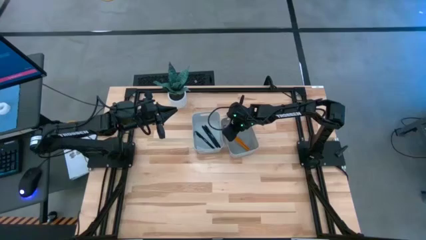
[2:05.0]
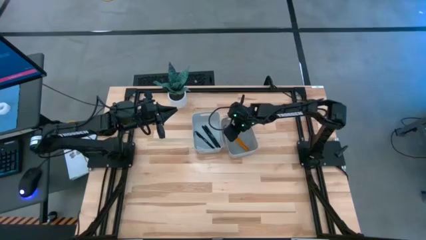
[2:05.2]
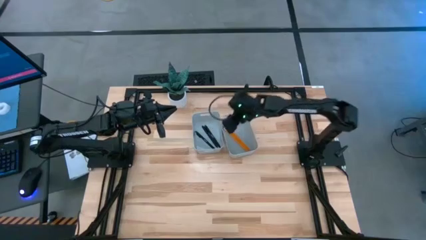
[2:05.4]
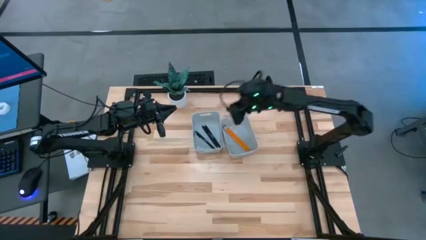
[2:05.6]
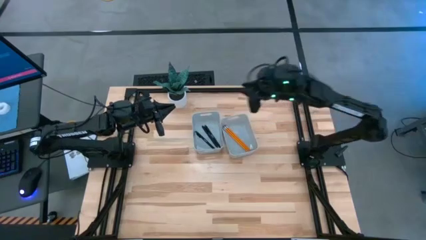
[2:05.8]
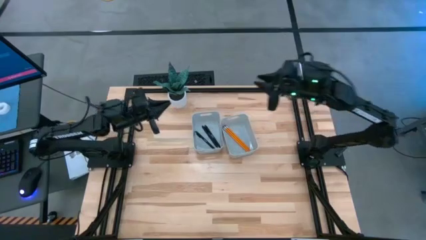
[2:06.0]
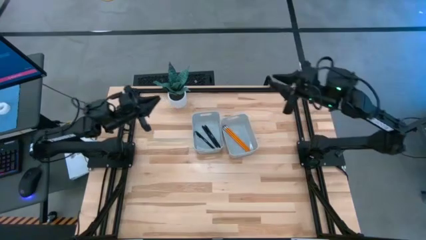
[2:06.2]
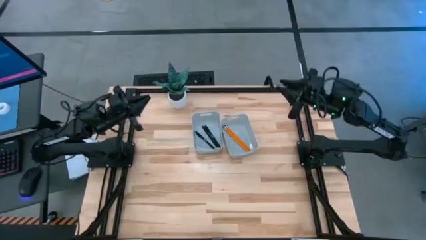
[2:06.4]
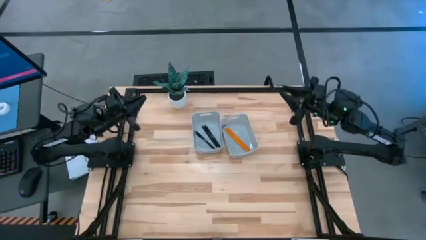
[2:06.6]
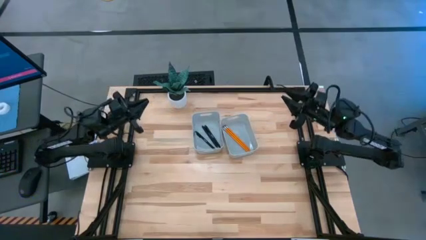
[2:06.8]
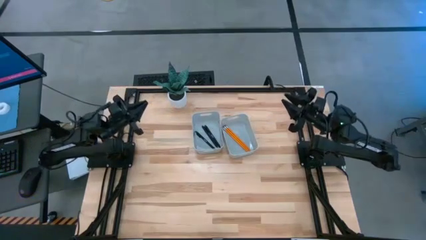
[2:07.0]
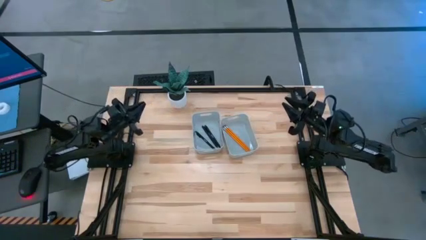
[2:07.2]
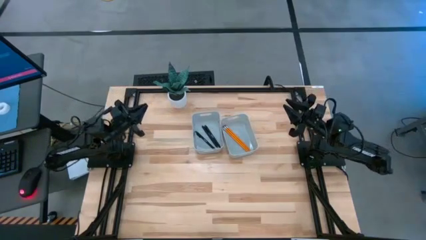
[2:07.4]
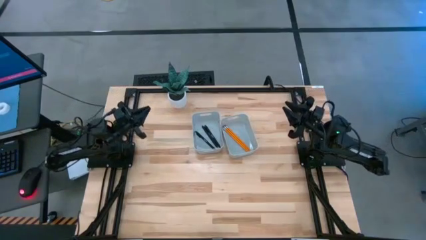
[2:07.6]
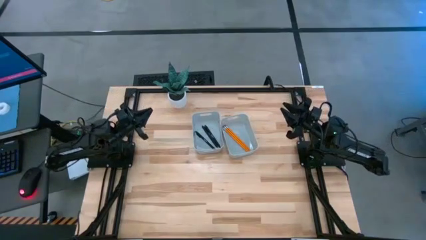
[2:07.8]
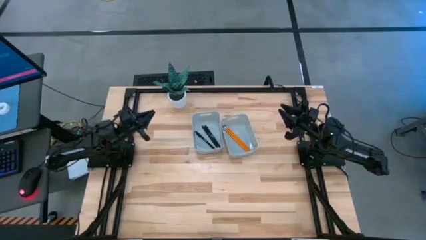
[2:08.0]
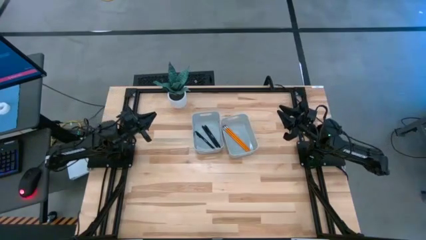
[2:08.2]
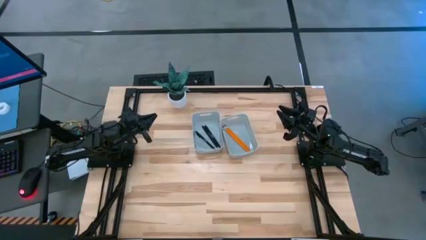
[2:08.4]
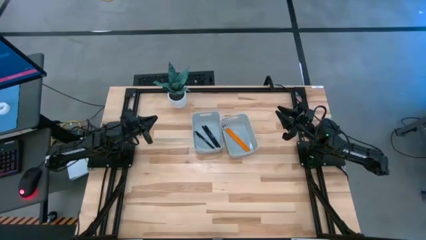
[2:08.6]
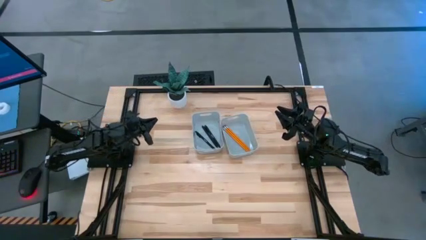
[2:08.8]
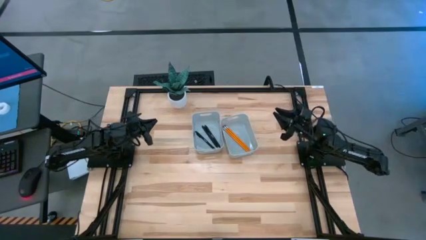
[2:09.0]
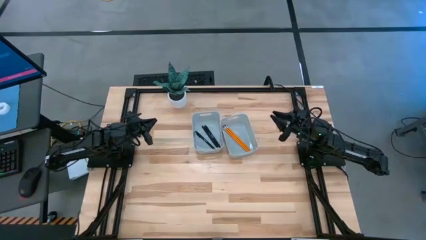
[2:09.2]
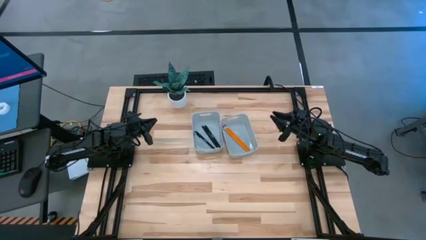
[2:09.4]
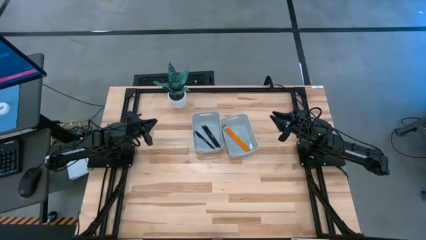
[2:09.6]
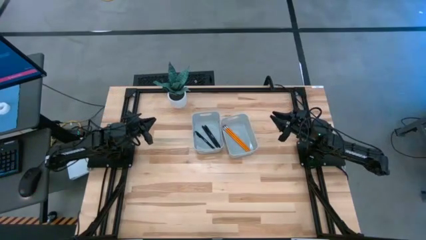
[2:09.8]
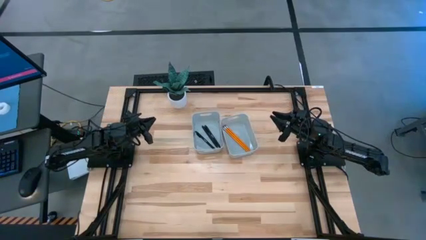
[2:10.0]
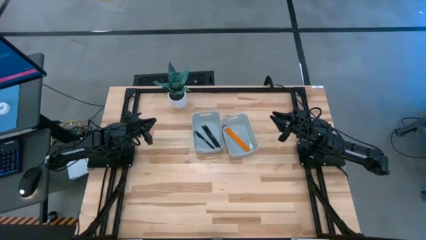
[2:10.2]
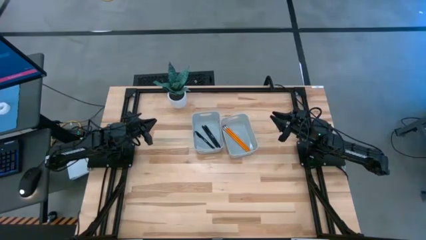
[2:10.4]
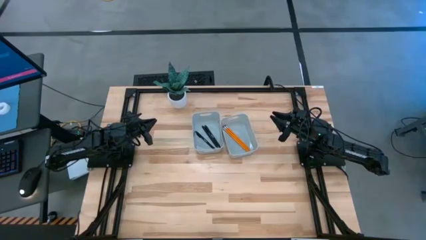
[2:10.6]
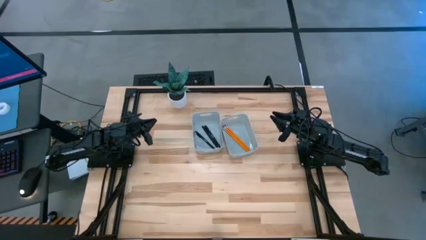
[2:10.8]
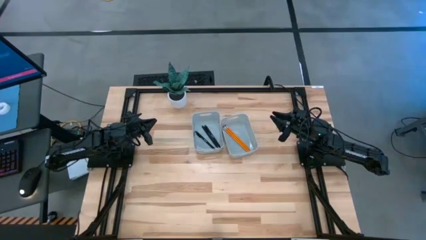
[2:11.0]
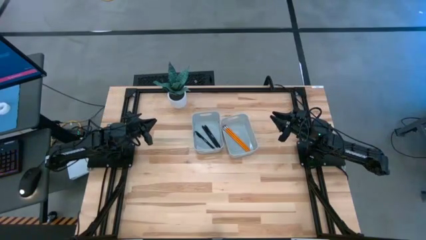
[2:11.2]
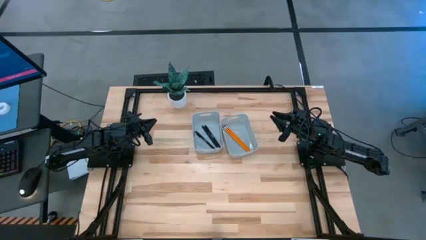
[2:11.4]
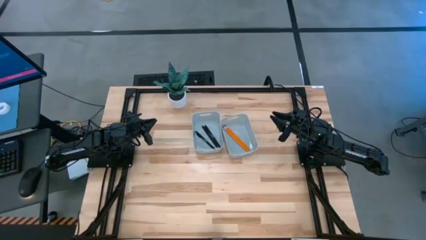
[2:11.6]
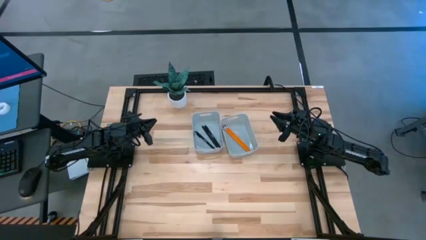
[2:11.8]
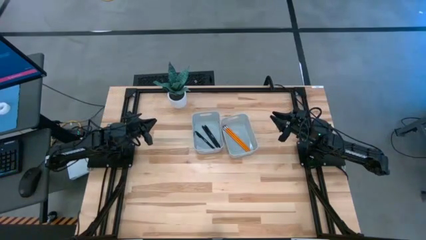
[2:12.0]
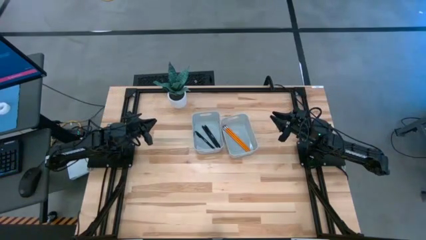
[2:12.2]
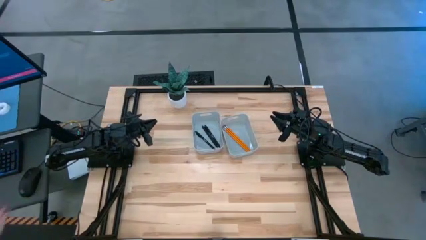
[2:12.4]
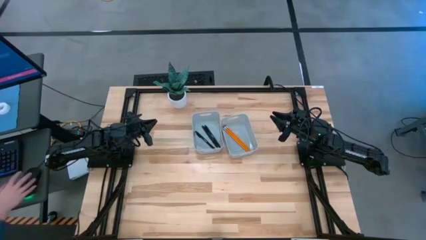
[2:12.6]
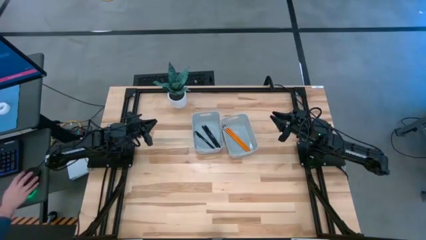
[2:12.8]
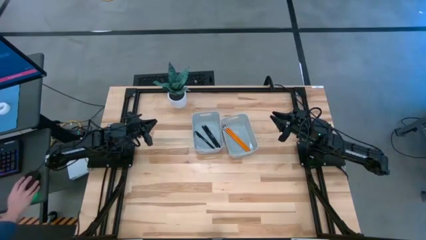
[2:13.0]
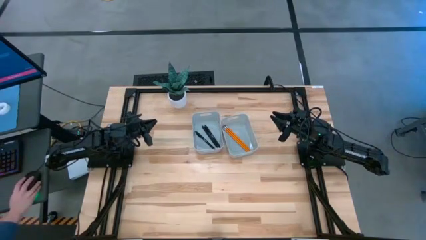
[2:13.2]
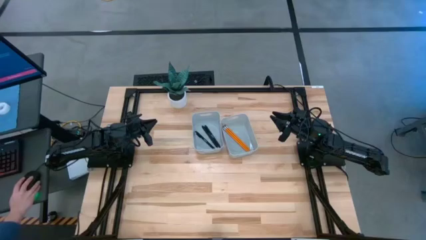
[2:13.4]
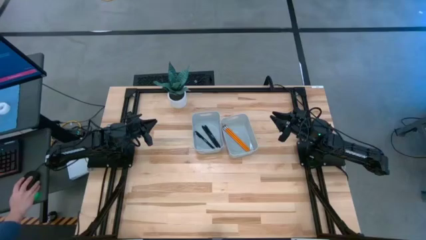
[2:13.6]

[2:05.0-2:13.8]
Task: Sort pens & pencils
Return to Home Position

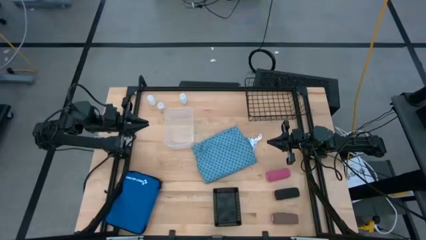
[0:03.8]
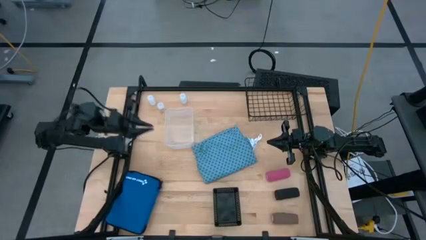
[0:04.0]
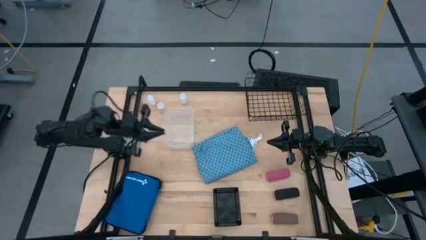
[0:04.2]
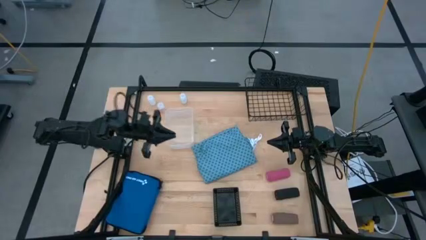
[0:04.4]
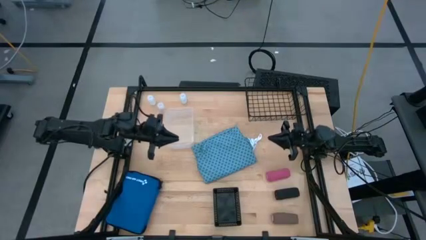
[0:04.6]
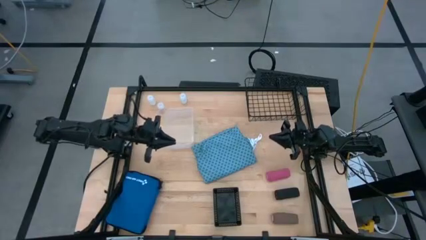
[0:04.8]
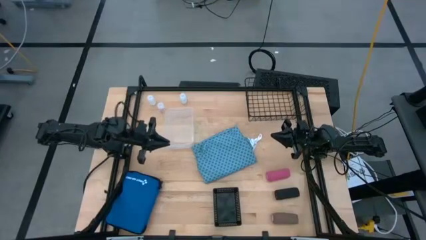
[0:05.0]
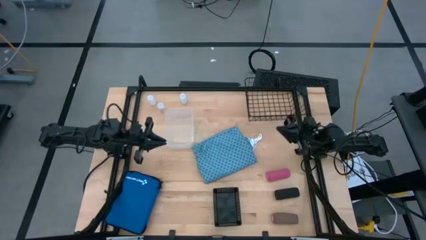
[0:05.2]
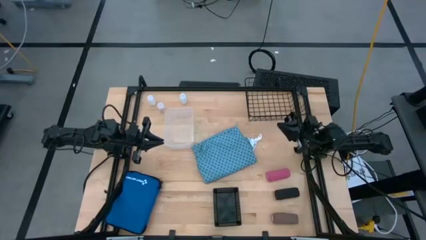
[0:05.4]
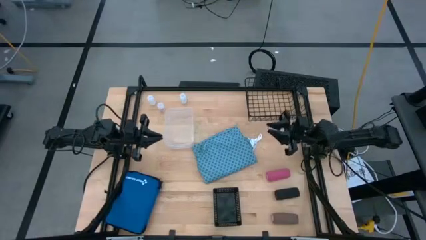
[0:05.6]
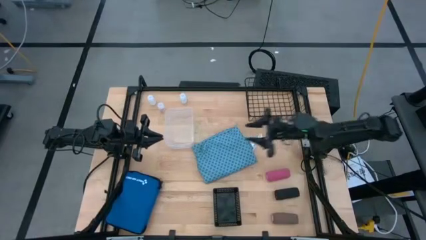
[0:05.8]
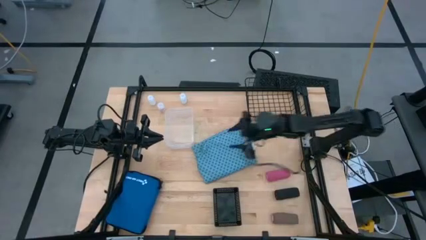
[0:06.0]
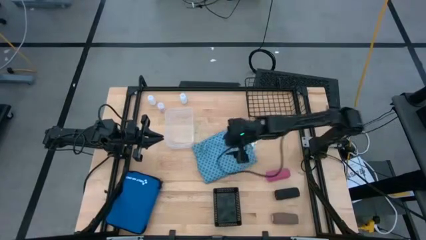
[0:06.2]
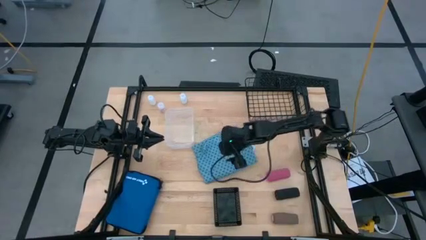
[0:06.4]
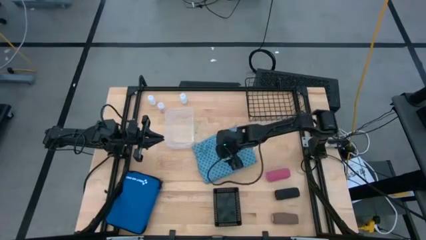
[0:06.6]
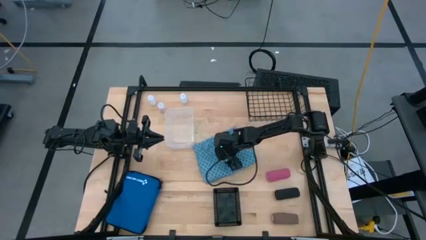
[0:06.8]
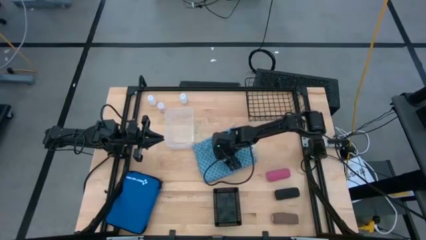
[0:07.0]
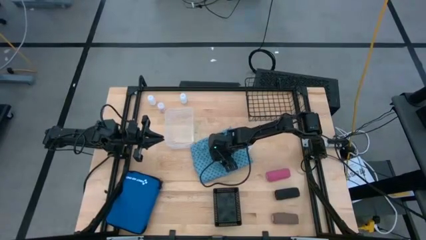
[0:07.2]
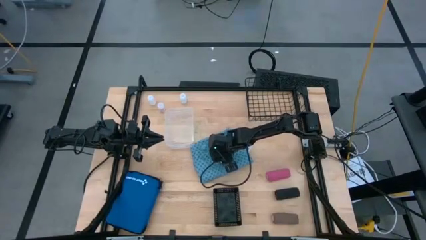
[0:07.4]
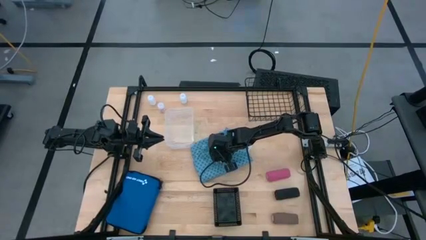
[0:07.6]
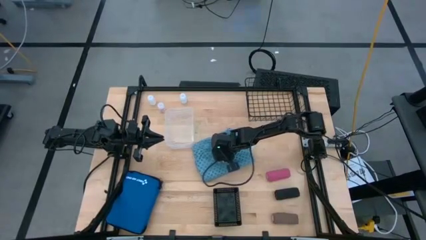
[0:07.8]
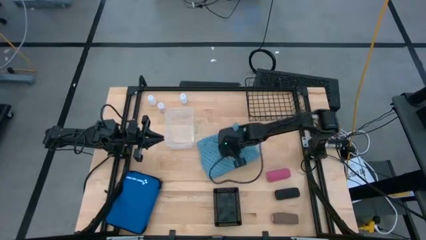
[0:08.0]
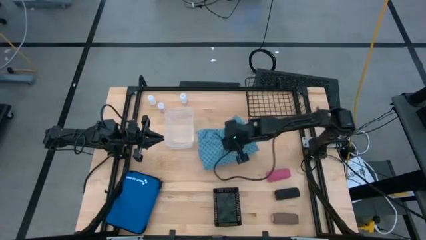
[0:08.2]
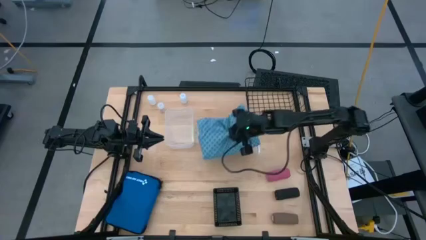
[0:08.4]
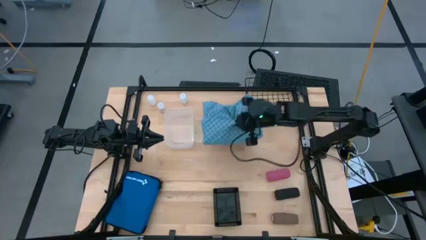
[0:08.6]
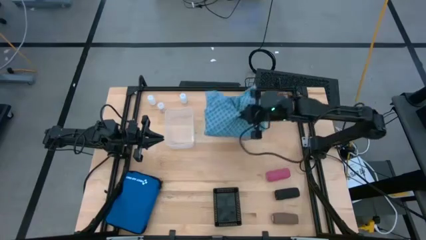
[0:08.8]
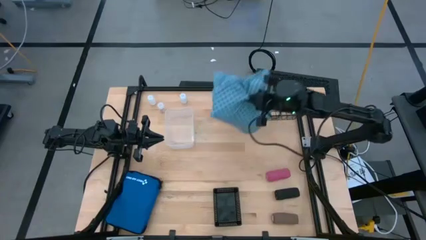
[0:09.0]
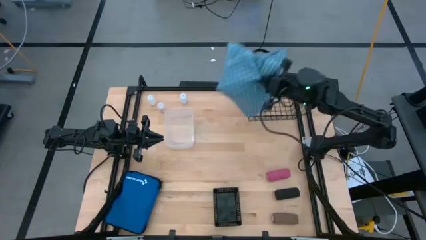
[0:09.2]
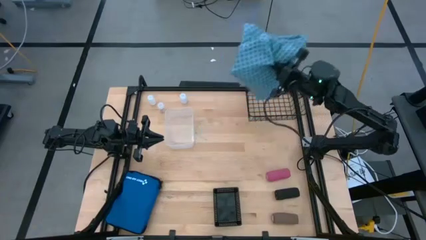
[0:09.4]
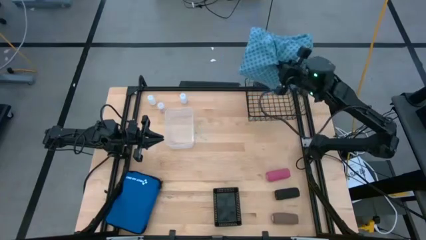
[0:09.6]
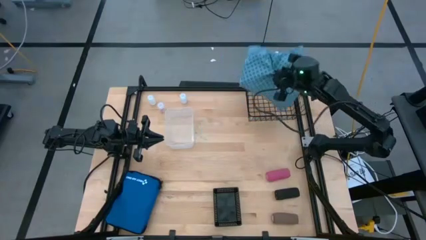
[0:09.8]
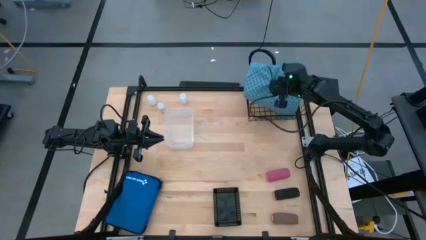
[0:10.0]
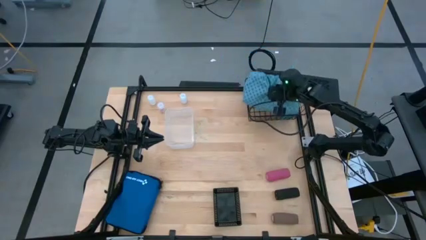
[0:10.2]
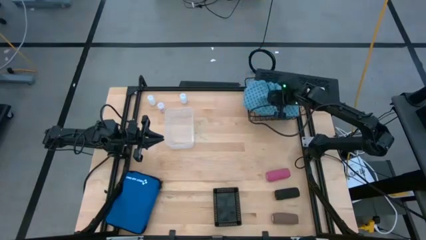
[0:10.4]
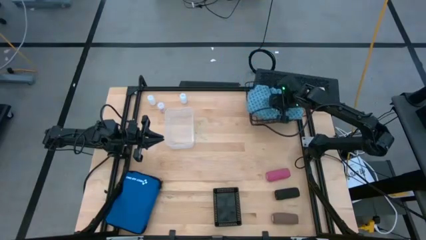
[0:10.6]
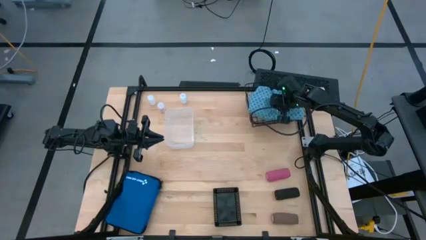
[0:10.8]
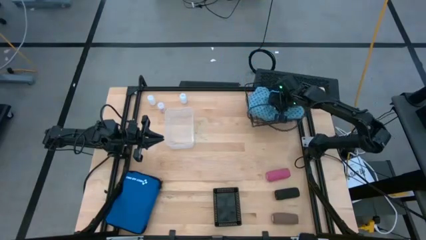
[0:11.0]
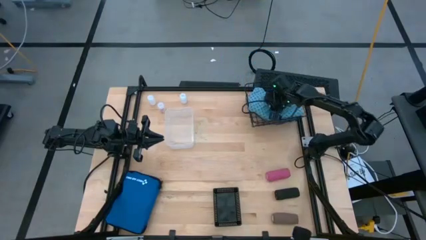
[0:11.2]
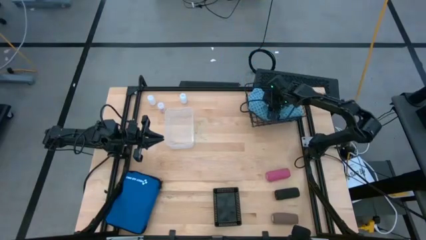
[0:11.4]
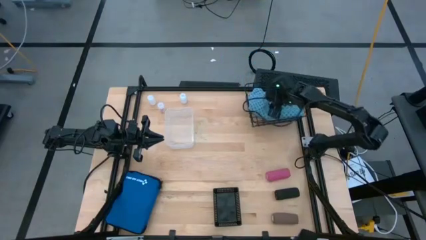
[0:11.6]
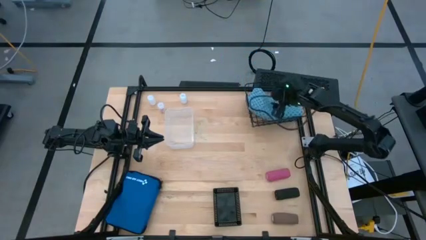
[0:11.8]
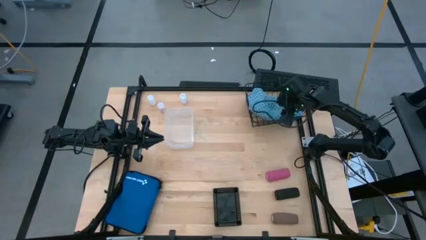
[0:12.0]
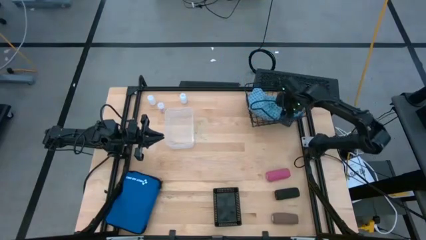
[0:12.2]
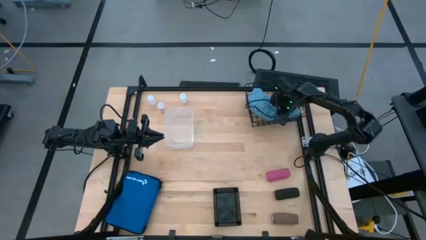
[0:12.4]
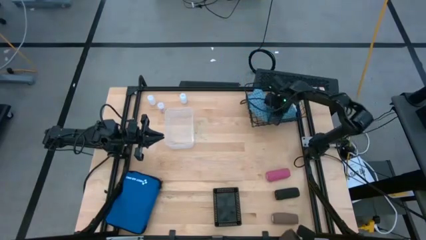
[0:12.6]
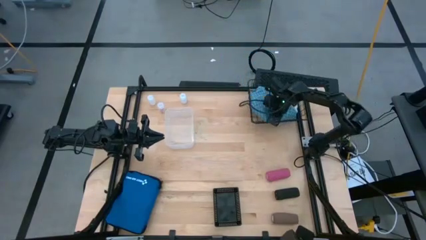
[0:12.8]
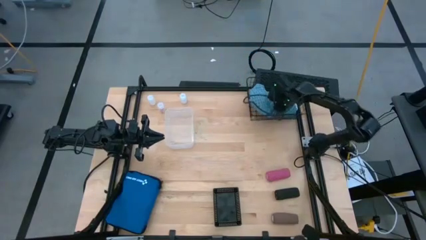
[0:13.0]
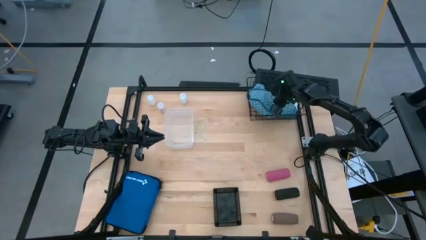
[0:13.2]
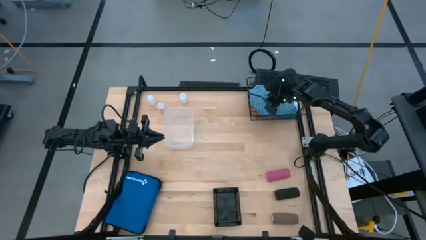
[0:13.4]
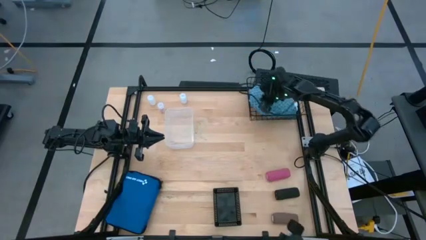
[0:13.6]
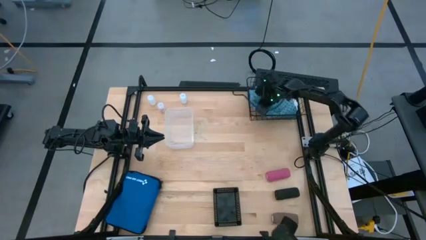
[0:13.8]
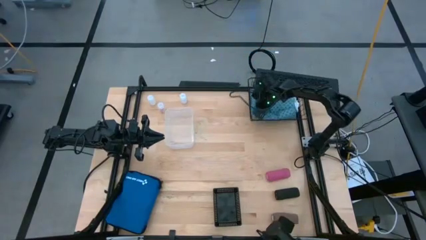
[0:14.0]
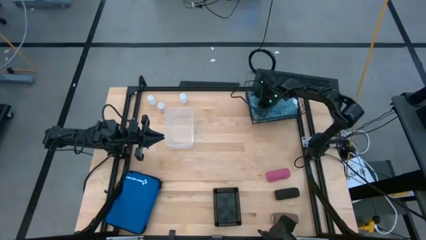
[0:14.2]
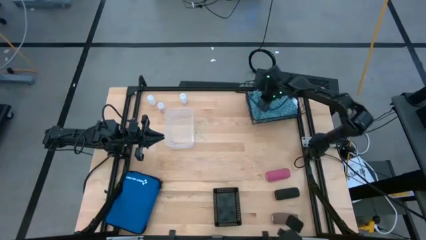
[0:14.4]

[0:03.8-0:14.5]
Task: Pick & Place Medicine items
Put the blue patient gown into the black wire basket
